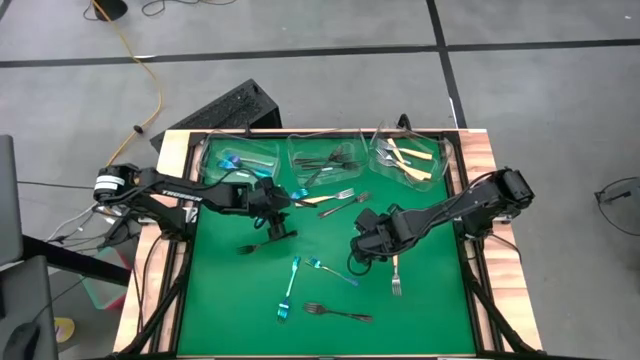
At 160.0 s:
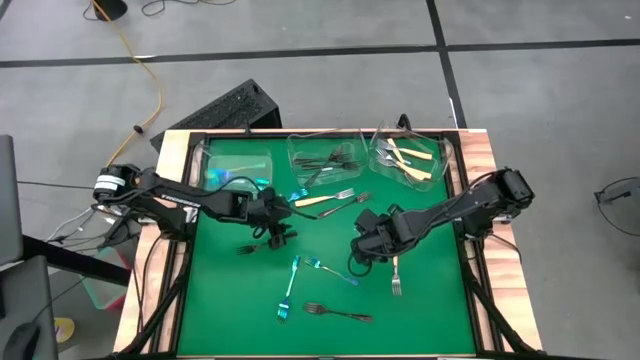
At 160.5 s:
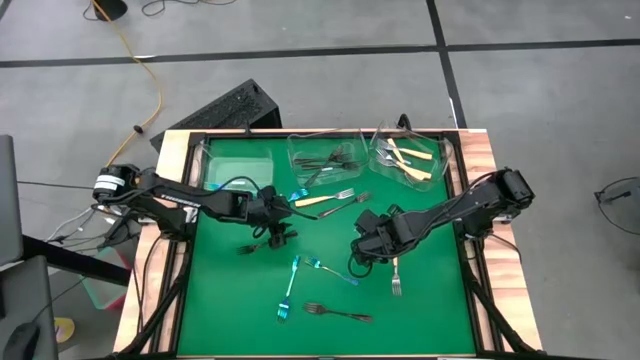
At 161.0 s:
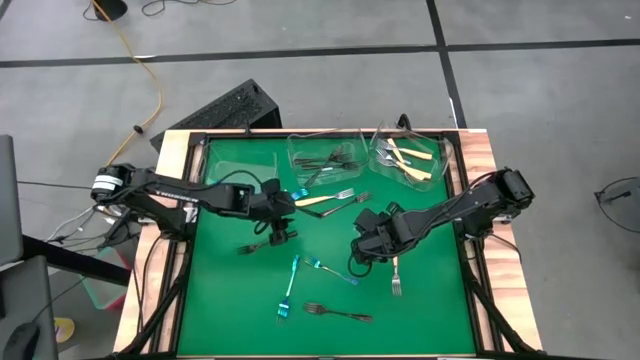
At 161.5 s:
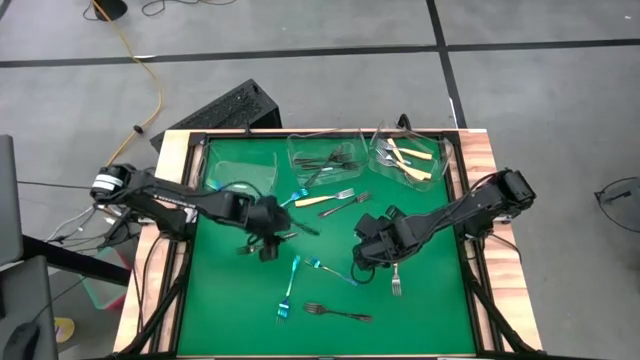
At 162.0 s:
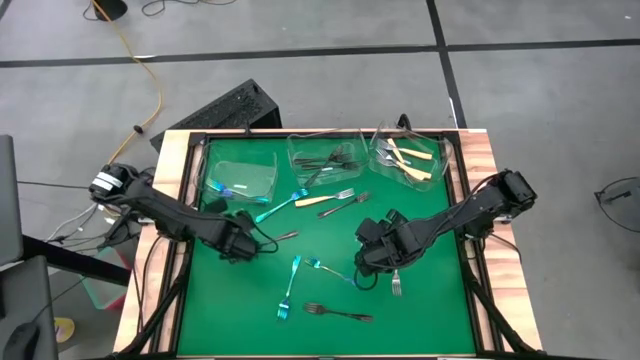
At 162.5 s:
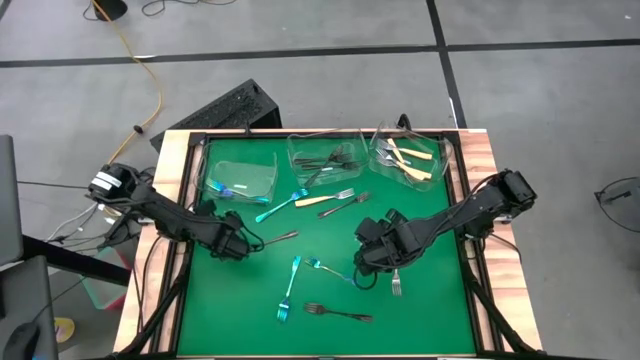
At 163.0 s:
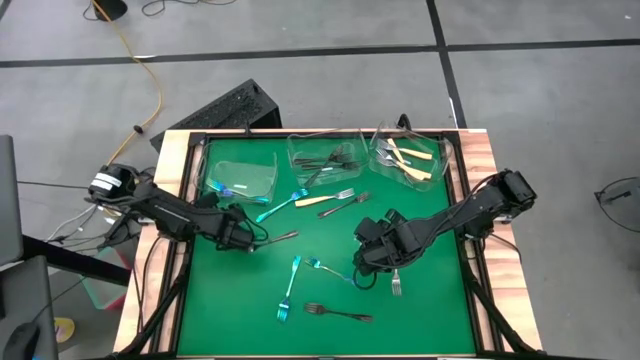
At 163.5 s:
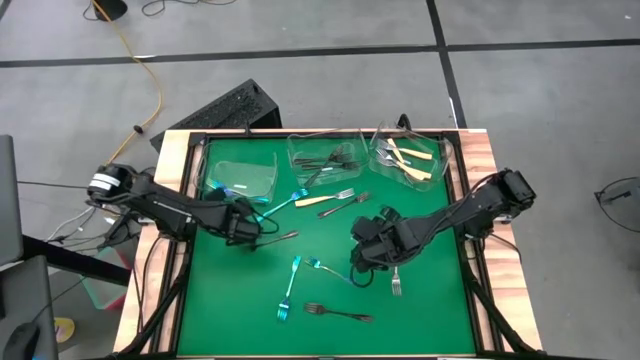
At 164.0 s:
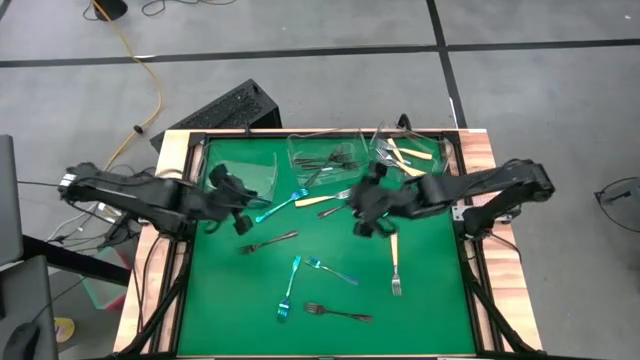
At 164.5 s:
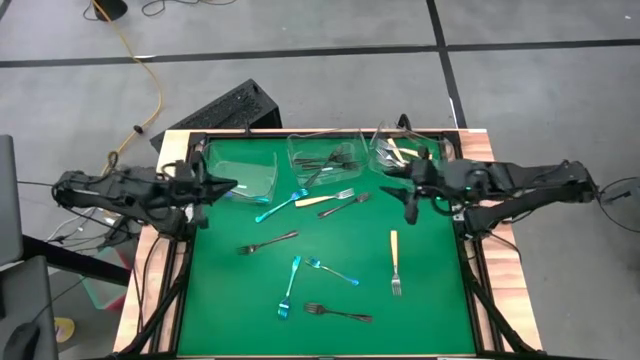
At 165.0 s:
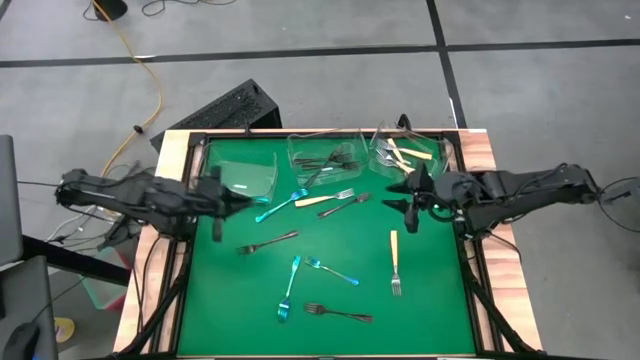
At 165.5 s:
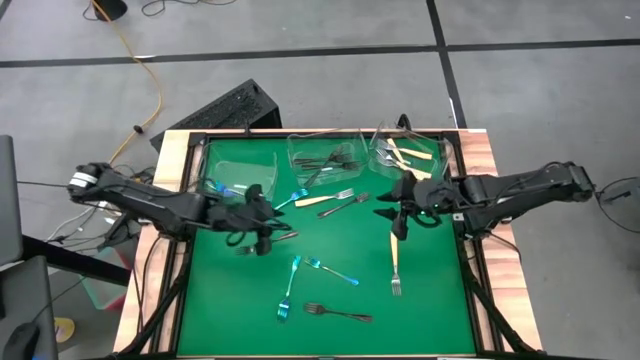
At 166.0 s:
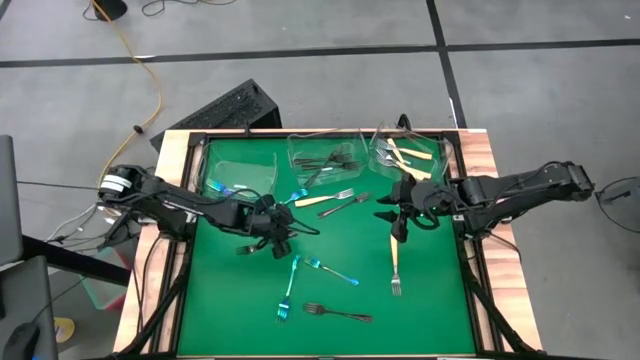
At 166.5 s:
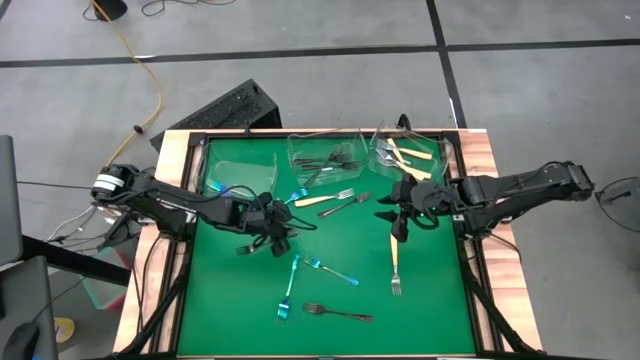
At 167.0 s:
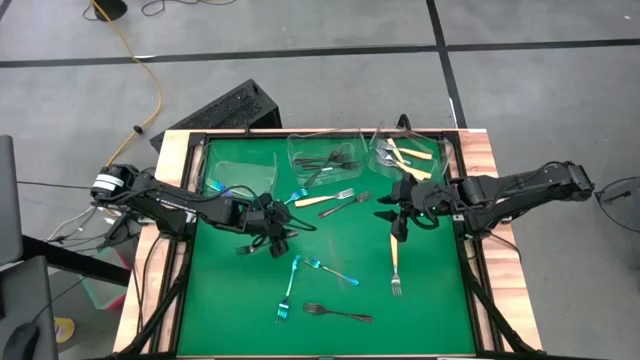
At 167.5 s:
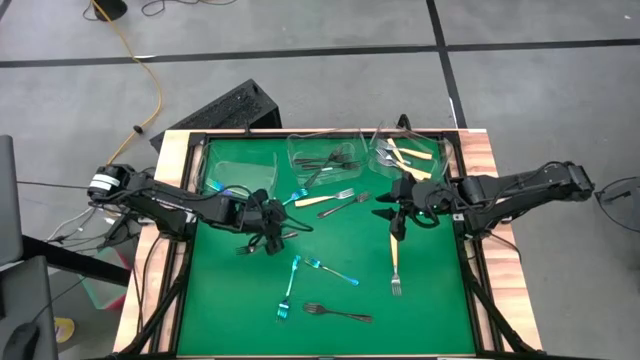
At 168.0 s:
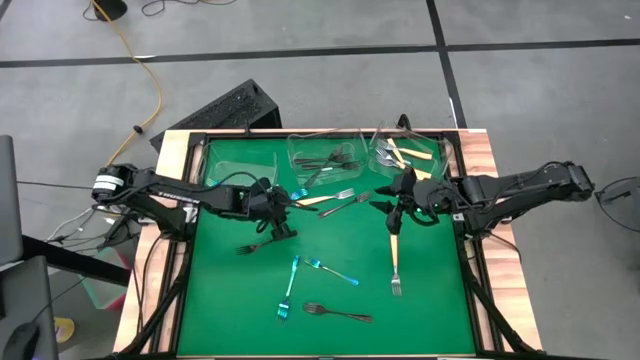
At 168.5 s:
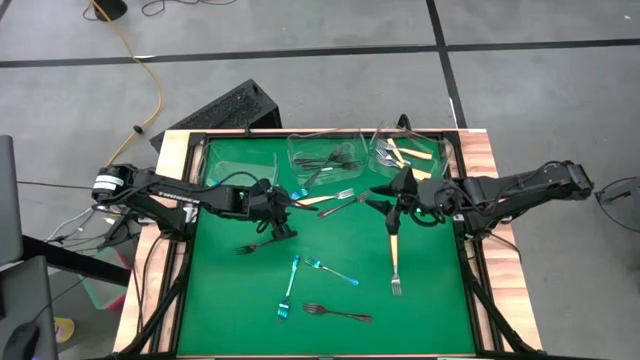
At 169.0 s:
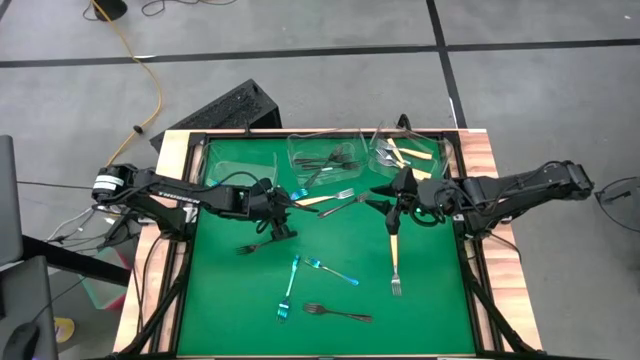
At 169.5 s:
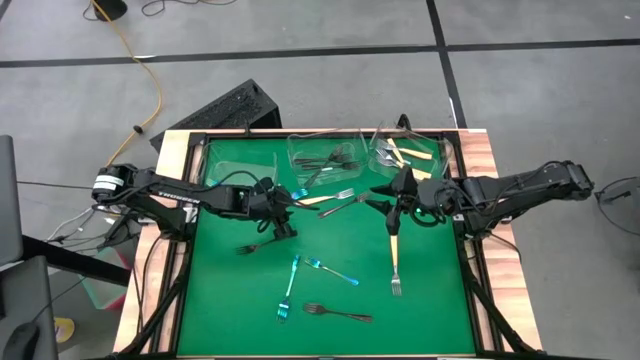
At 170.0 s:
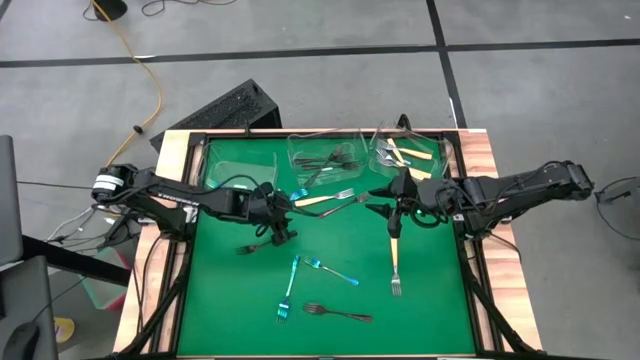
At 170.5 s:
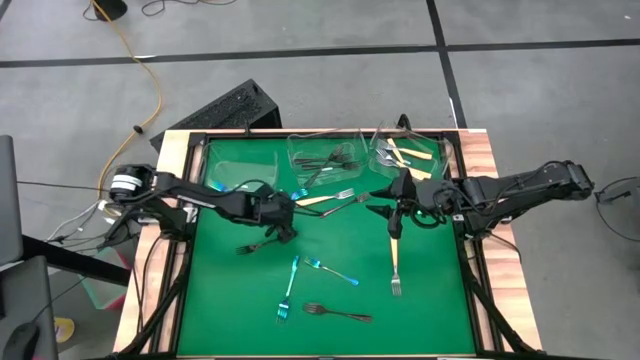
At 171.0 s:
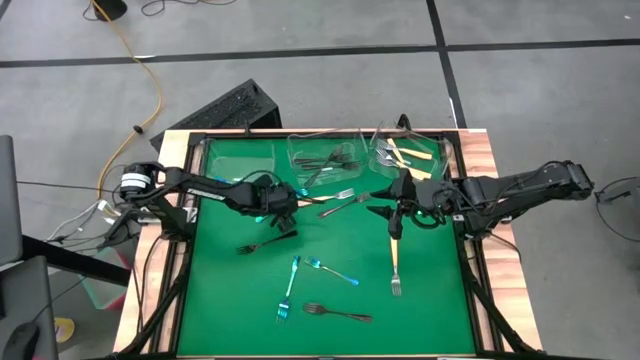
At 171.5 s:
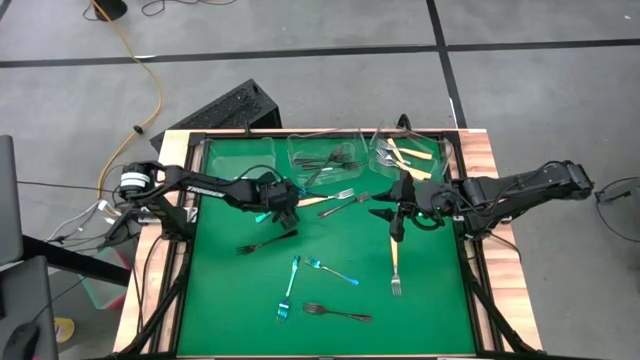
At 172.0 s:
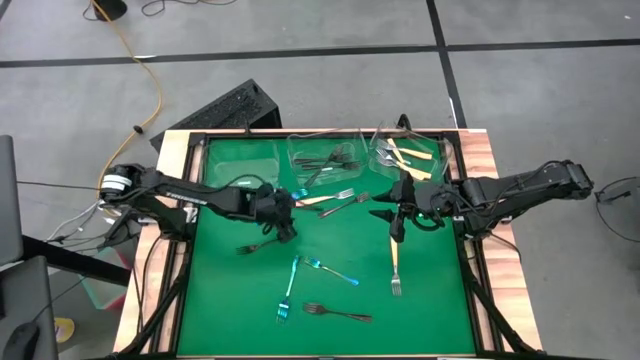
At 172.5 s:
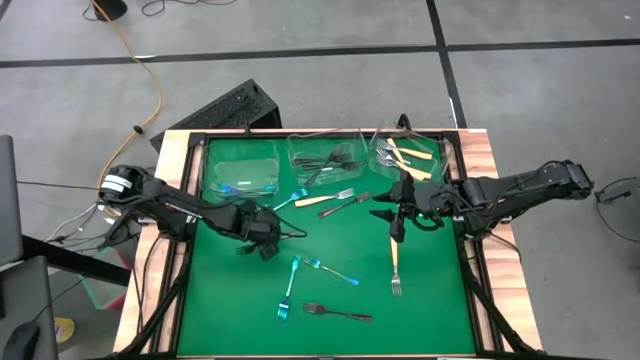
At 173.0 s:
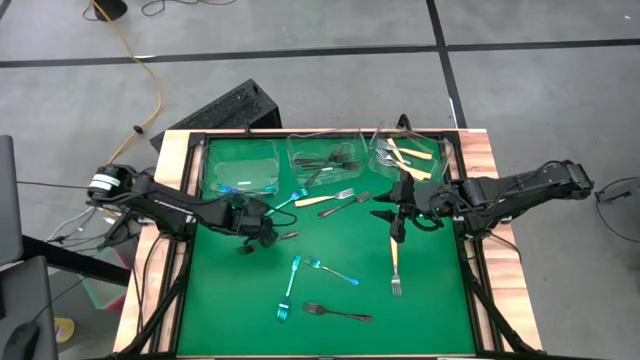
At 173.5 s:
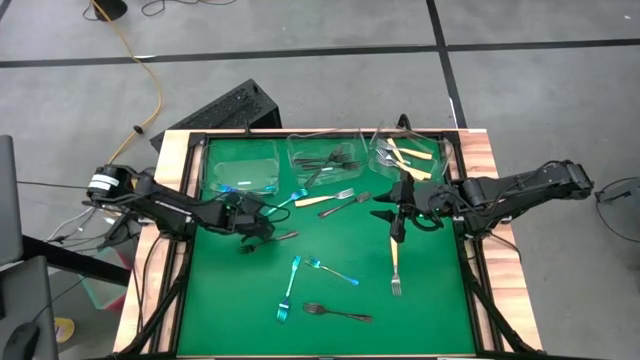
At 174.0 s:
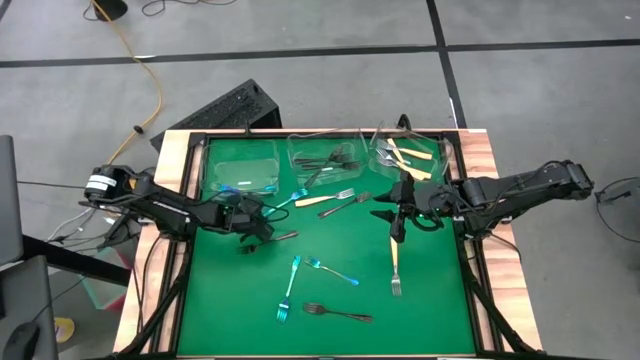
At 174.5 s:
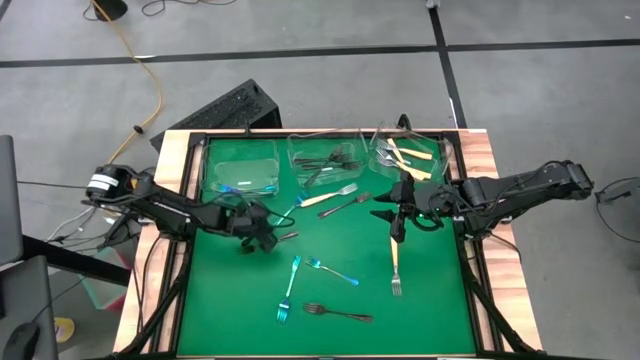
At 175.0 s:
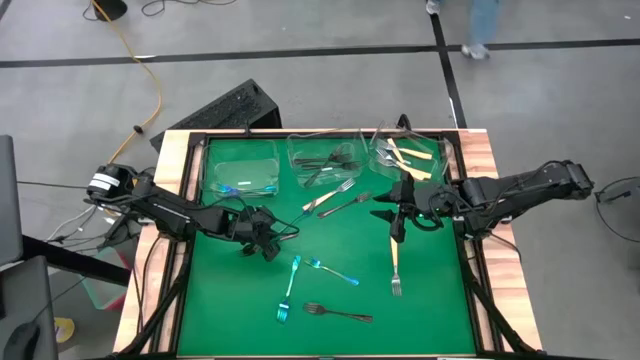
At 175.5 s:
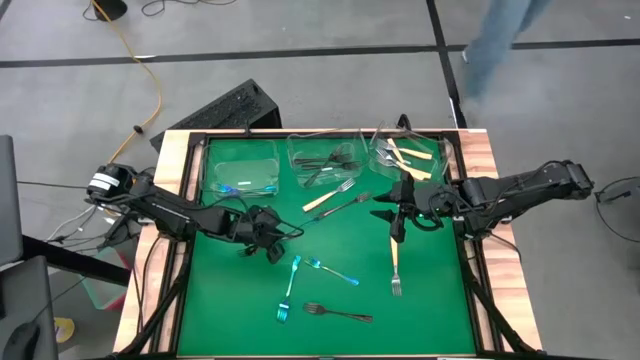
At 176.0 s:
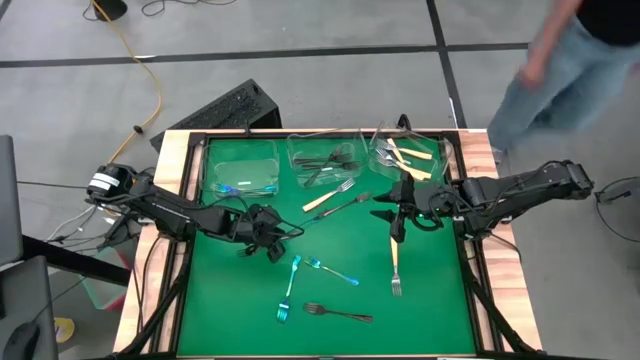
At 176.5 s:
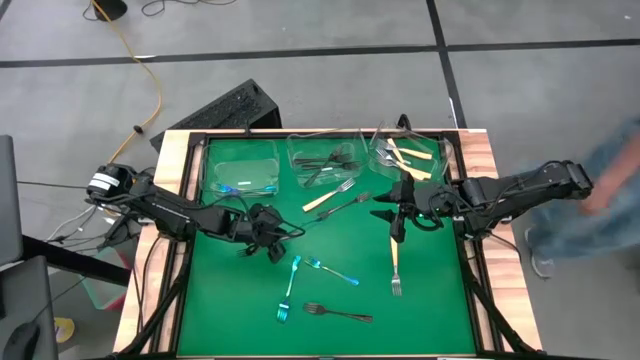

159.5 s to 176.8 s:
Task: Sort silverware by color (type)
Put the blue fork into the left transparent bin

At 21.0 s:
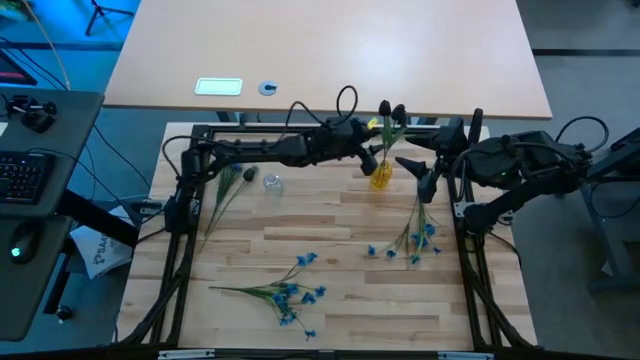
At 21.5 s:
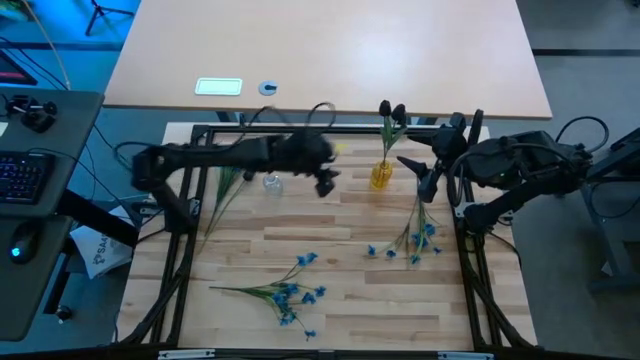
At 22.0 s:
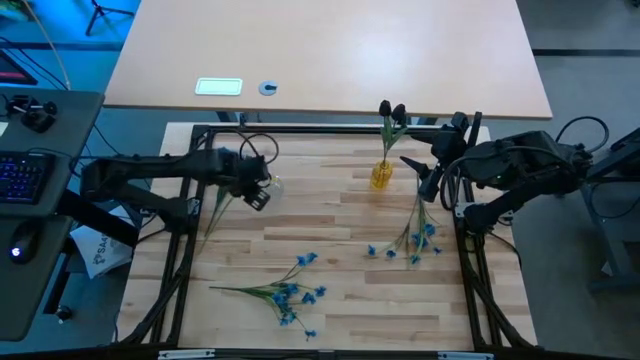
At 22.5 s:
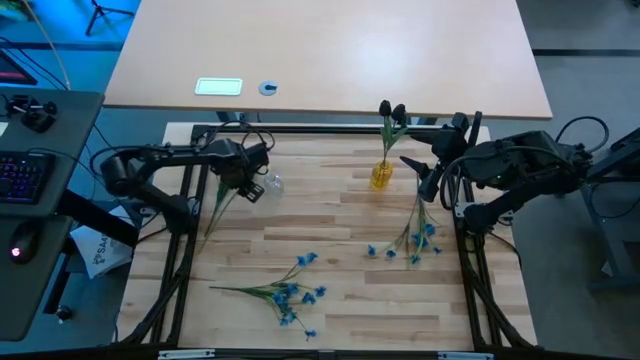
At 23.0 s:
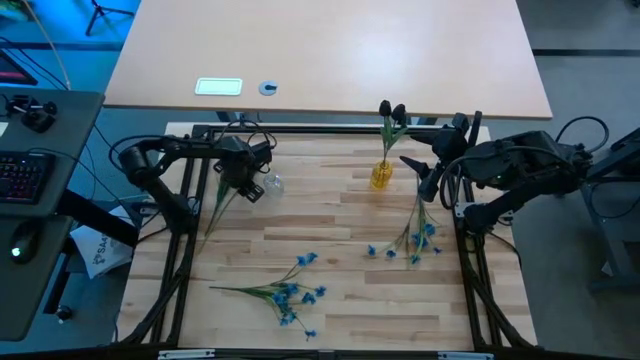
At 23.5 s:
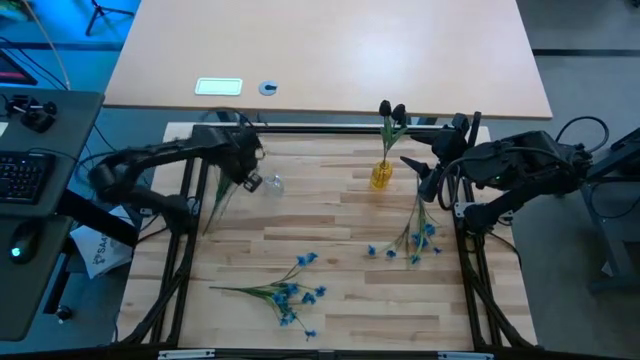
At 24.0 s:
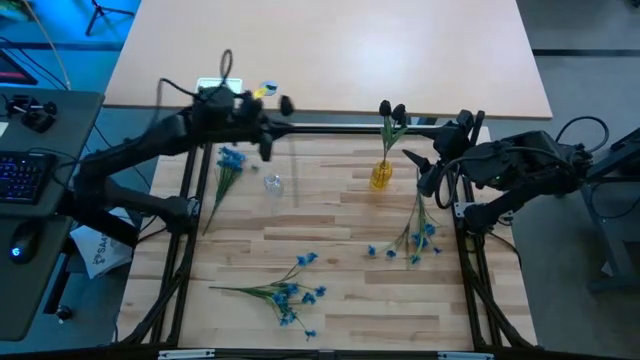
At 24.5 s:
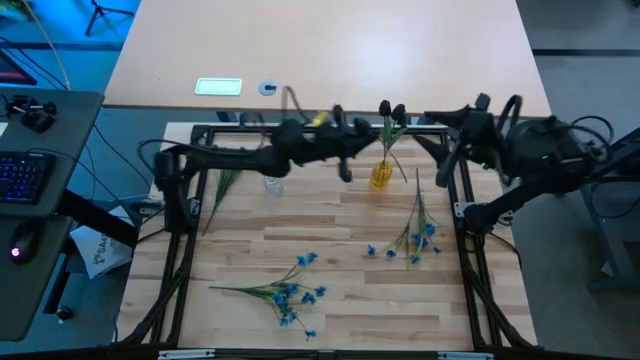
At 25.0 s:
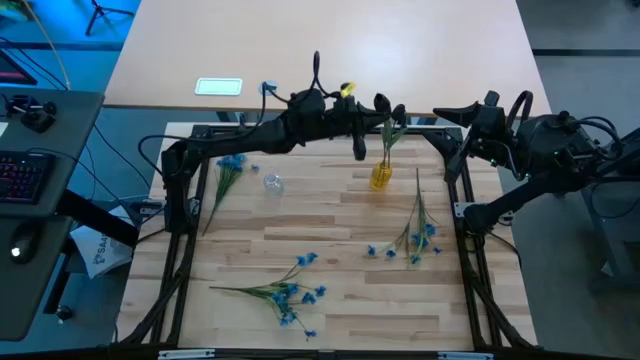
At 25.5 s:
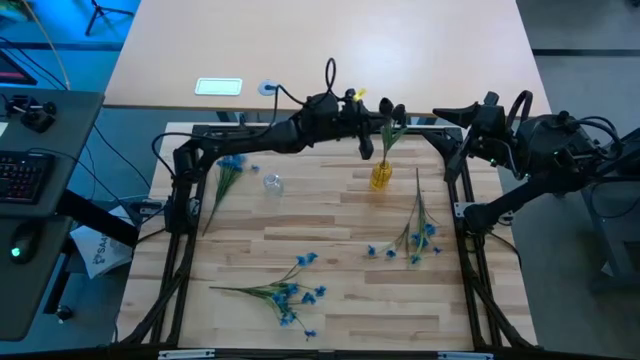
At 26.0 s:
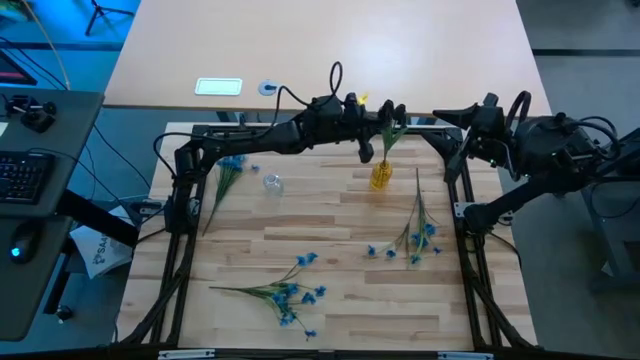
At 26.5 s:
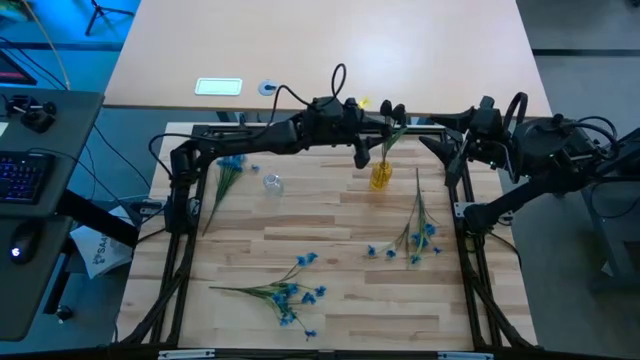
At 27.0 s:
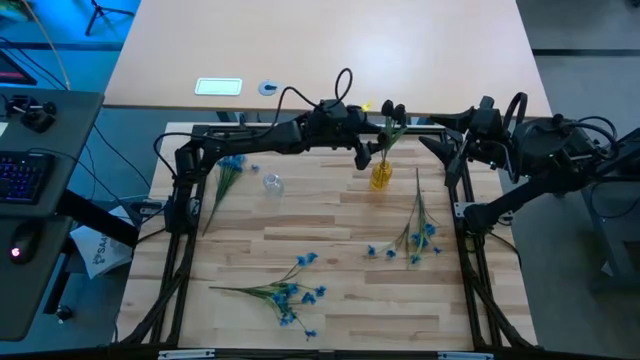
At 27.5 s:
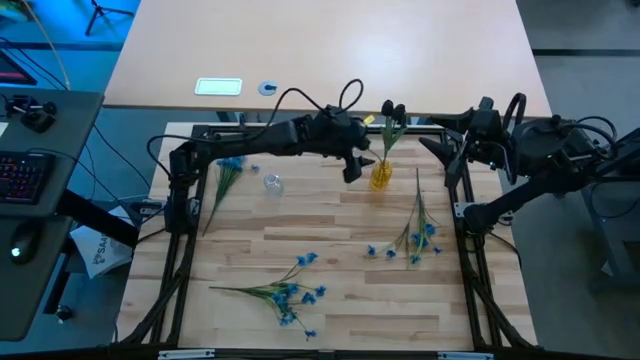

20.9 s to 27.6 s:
Task: Sort flowers into vase by color
Put the black tulip flower into the yellow crystal vase
